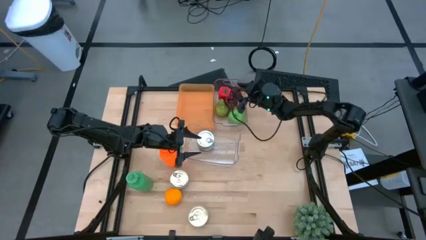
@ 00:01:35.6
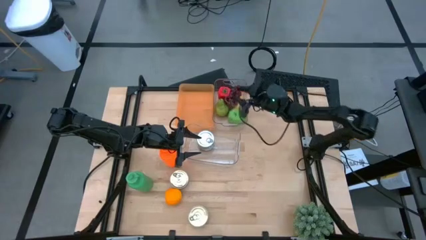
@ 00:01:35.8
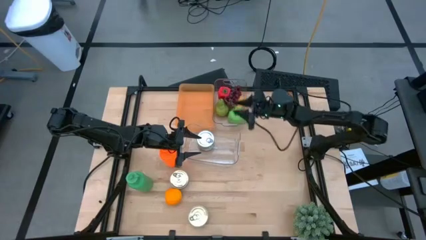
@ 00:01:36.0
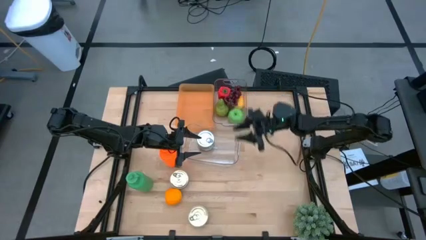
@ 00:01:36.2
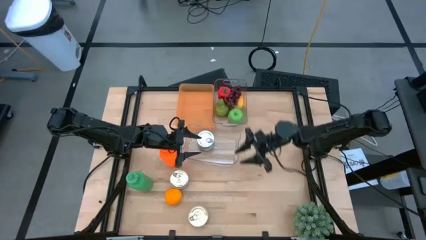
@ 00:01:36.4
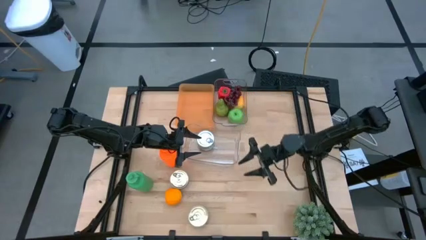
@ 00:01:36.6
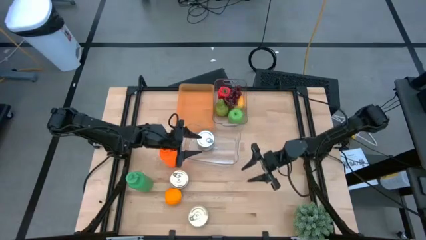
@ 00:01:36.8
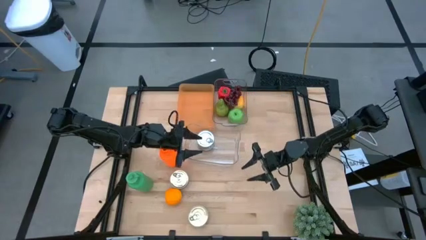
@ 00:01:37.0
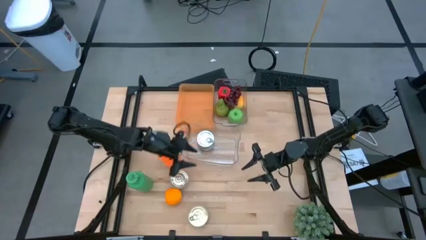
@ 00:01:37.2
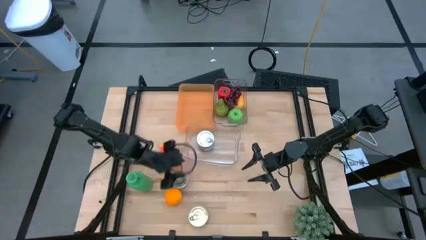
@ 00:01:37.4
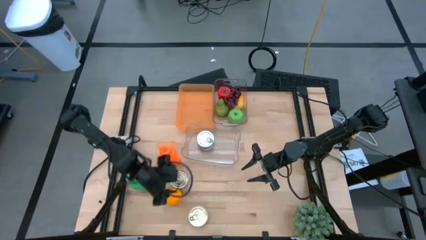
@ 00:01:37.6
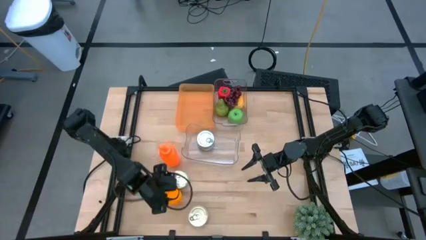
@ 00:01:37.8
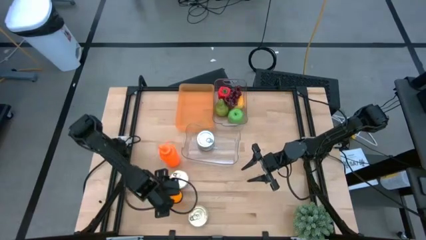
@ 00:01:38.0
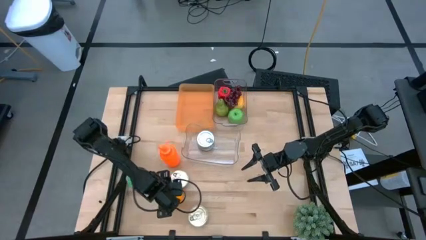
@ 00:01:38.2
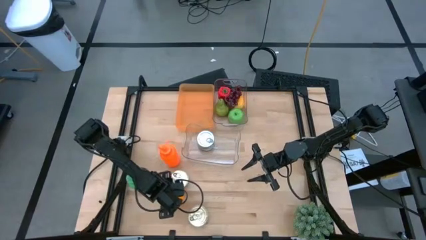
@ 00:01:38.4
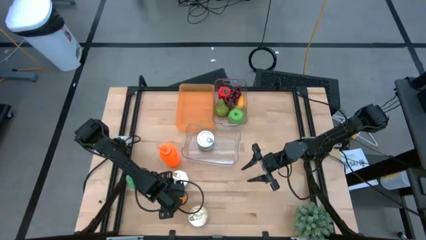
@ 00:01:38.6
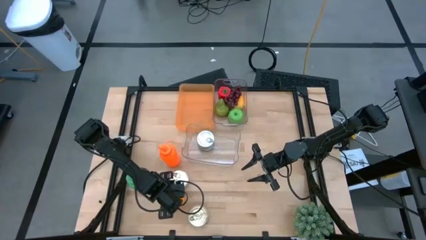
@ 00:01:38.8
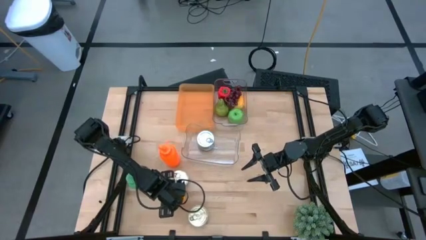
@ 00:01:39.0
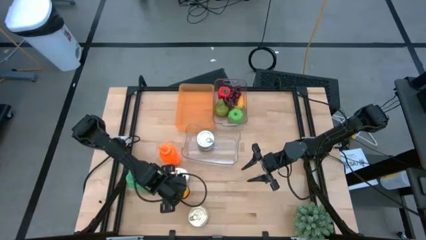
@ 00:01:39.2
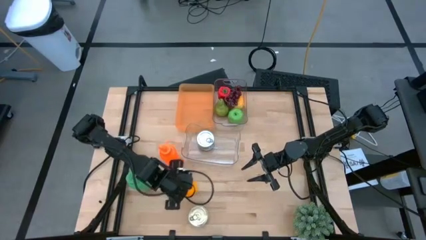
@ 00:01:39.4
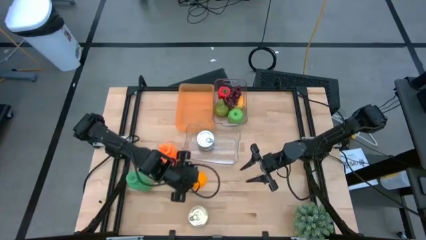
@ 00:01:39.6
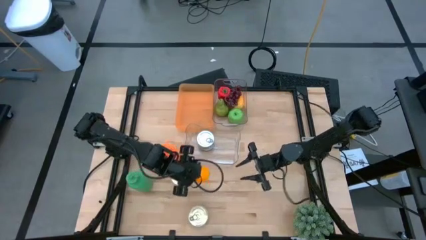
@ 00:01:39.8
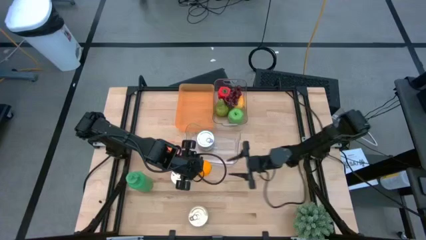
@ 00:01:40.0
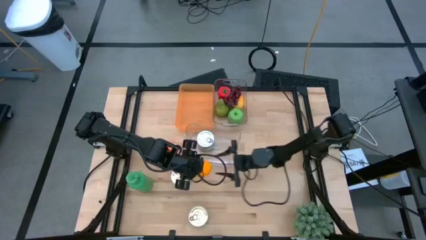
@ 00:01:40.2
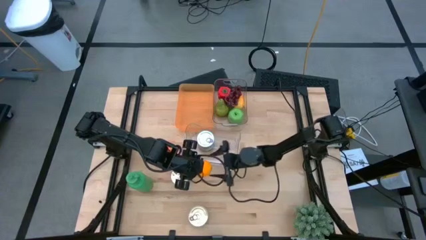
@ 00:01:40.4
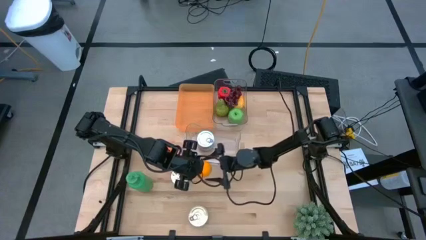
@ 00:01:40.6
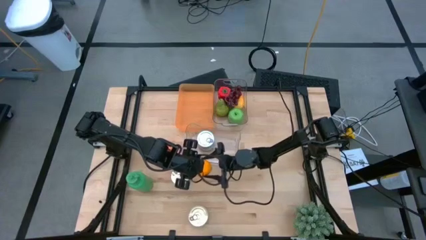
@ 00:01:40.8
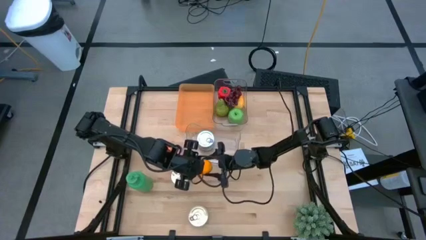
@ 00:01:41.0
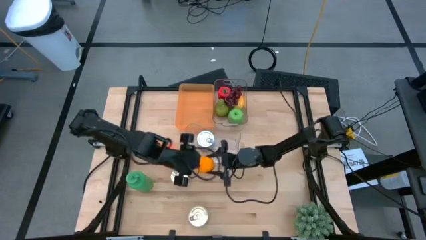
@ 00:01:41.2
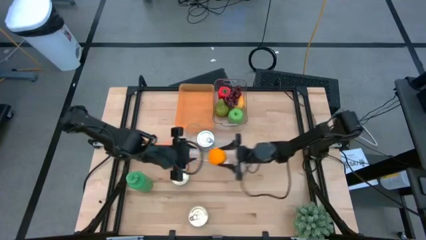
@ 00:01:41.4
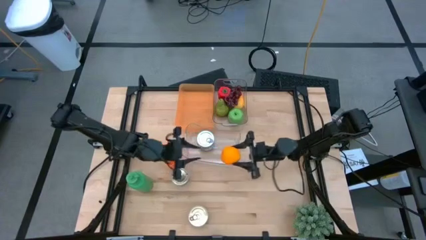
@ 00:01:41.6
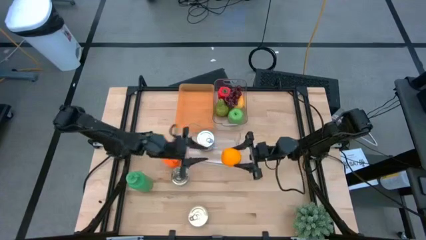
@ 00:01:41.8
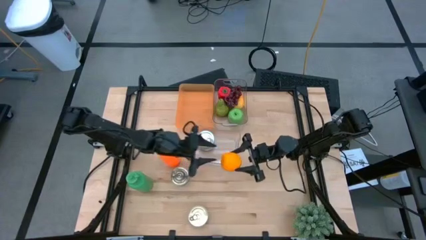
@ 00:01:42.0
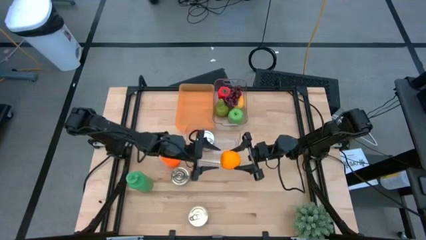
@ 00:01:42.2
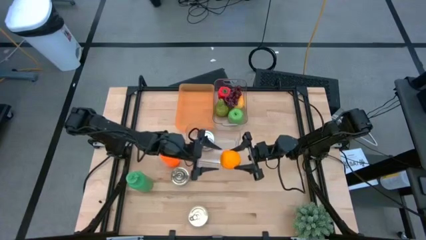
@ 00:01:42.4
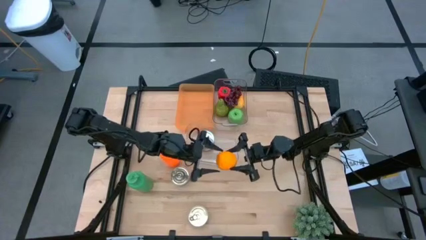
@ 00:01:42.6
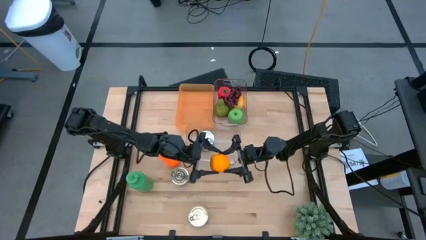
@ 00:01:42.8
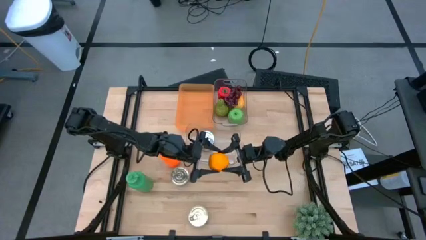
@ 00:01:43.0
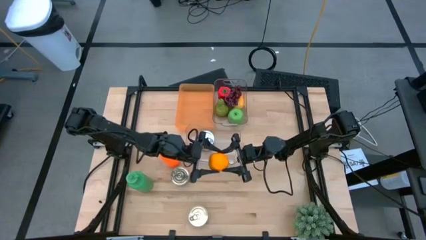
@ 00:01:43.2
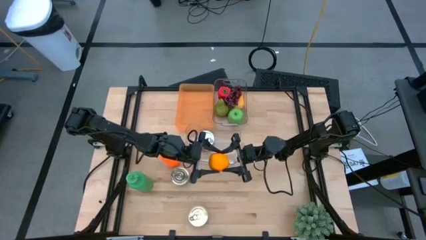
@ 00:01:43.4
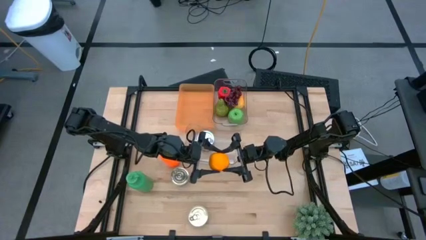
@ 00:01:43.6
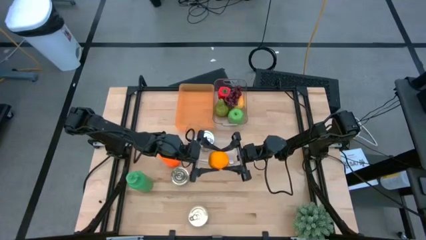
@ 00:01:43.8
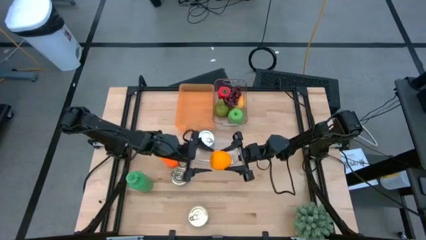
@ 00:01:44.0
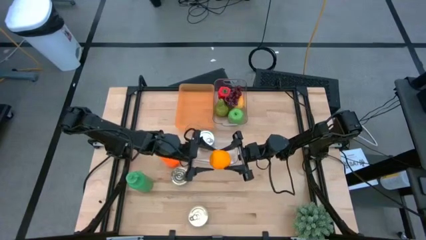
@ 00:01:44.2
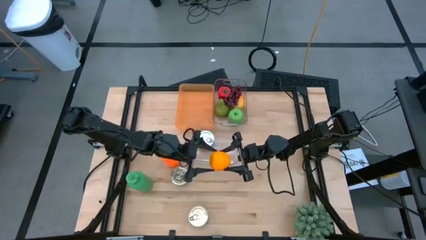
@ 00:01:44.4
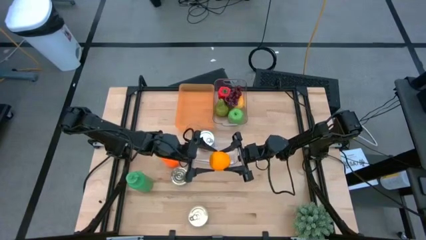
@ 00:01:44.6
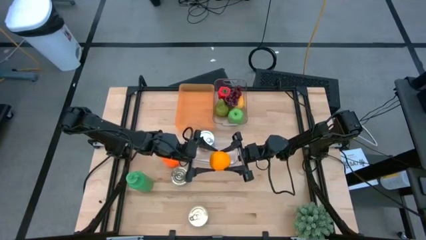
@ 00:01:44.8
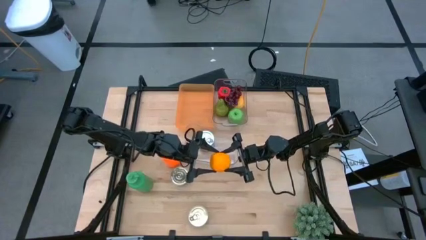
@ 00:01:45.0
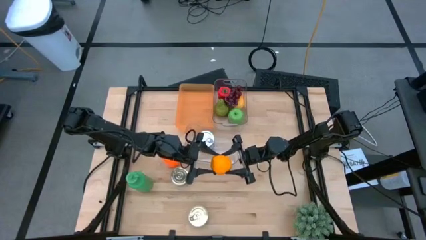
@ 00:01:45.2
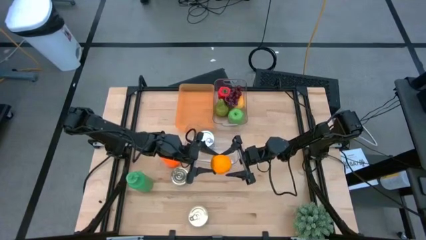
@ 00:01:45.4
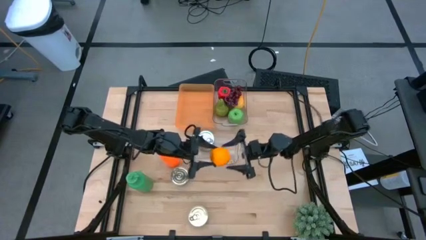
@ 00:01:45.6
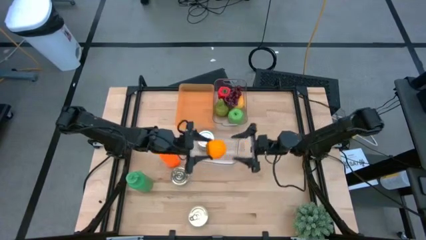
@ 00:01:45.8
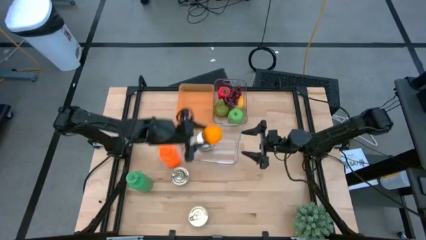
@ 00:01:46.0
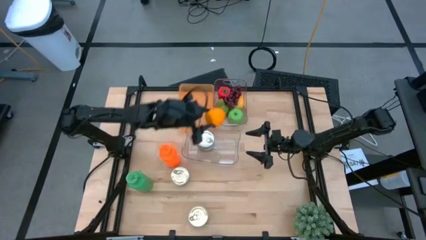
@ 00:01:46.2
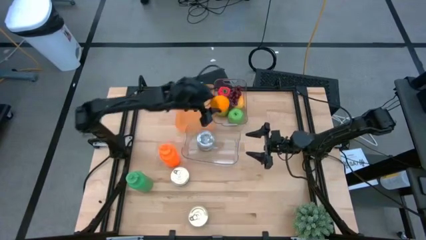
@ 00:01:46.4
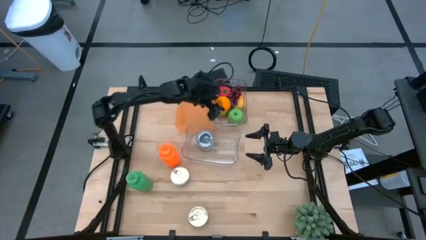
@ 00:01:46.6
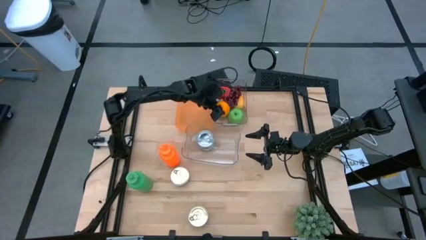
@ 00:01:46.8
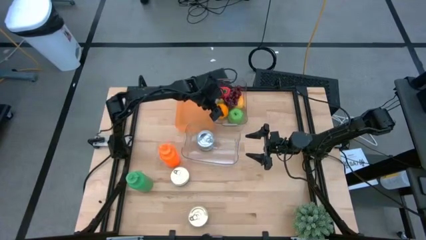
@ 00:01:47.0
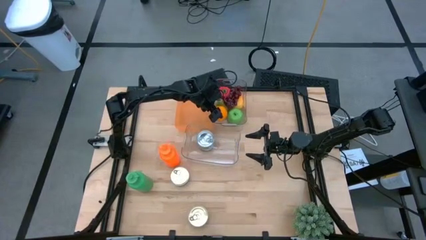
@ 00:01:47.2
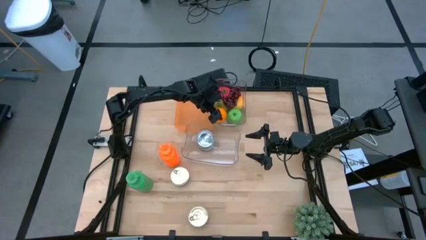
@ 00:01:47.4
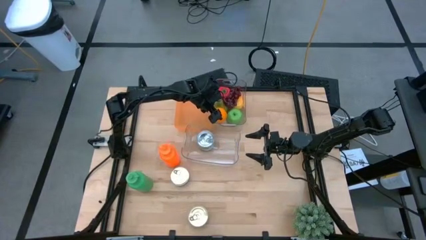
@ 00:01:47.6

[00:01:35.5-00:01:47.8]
Task: Pick & Place Food Item
Put the orange into the top transparent bin

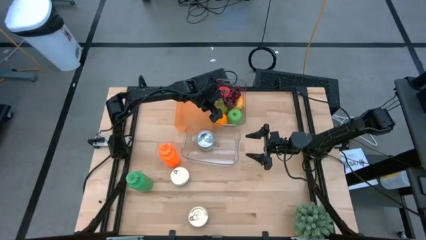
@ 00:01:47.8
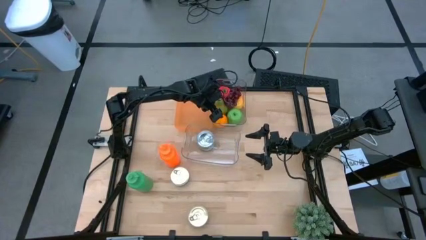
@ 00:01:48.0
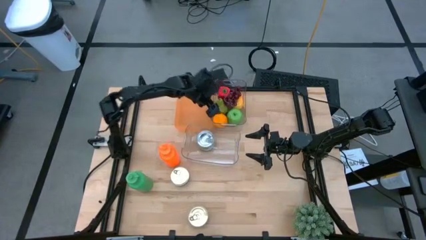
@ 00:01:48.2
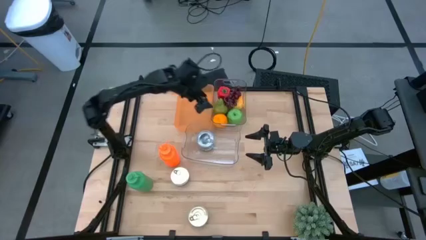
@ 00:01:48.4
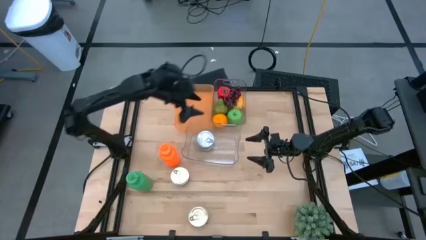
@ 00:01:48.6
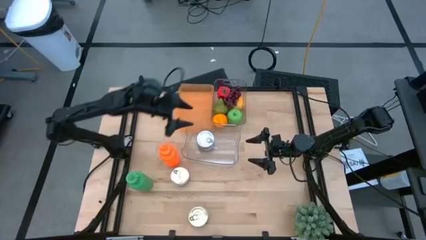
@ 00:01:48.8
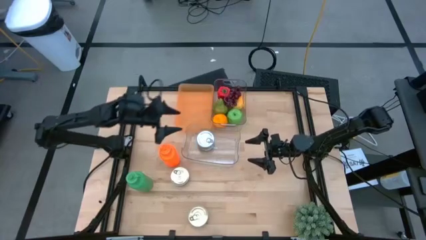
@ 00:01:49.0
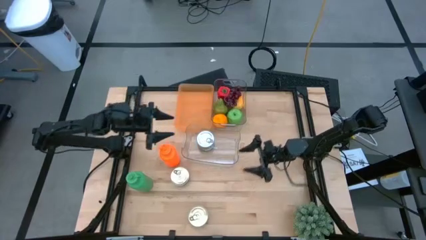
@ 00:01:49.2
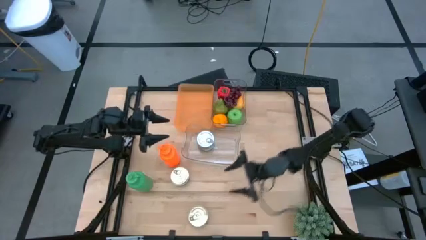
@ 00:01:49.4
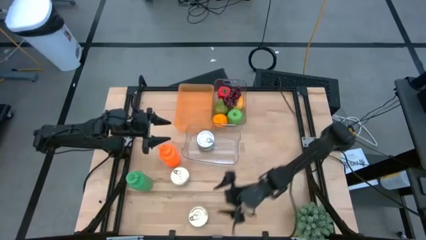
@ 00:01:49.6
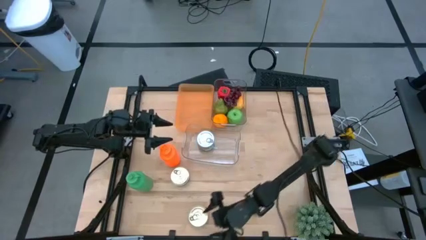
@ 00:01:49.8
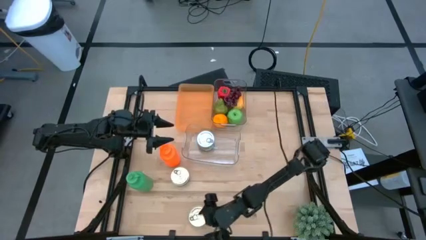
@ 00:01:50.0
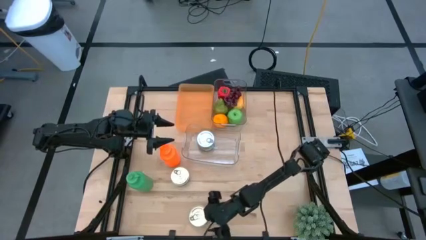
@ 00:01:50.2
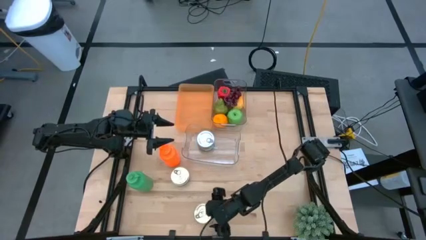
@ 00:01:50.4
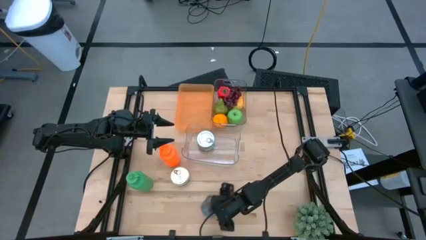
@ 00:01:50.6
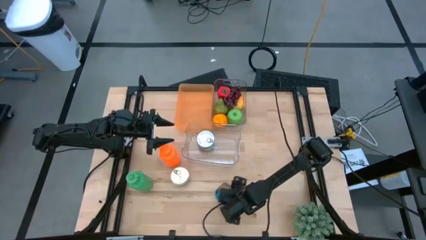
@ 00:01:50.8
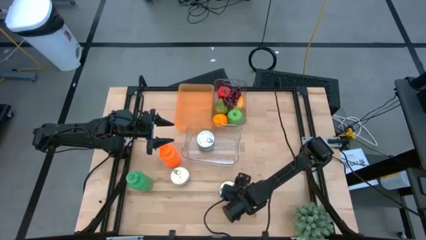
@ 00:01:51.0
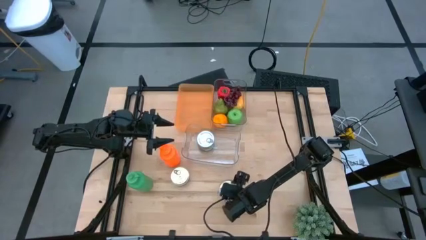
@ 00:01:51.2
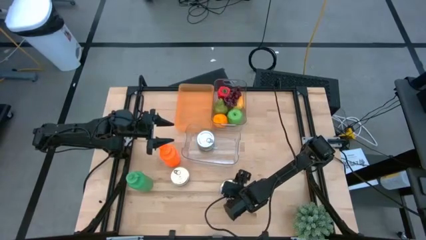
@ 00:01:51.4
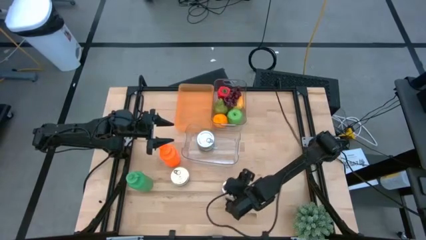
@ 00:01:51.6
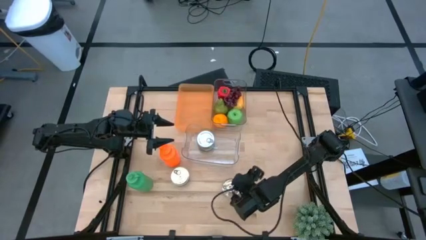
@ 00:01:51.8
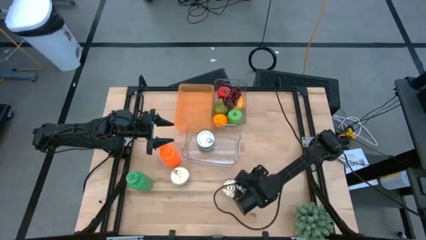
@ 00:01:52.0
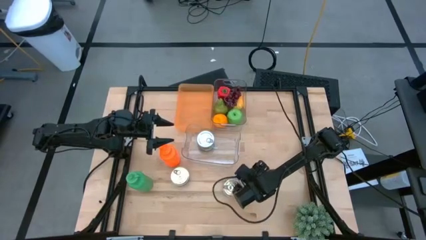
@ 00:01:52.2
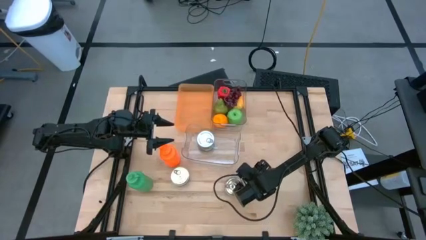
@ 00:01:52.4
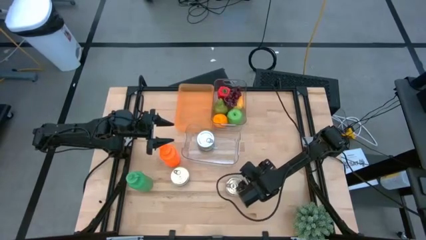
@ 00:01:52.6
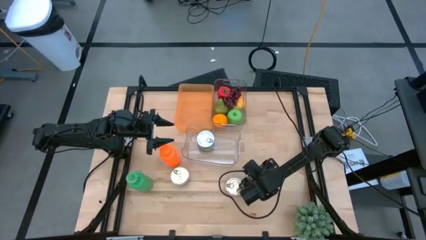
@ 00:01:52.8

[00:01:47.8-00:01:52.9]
Put the bottom blue pink tuna can into the bottom transparent bin
